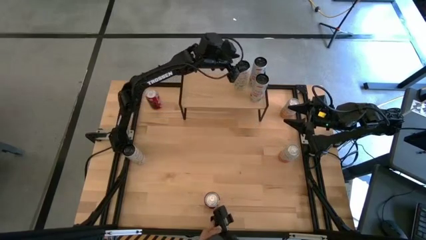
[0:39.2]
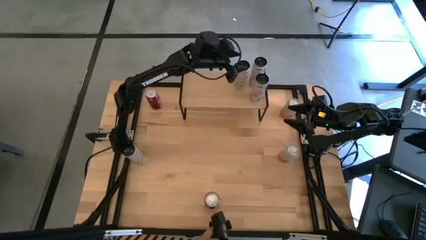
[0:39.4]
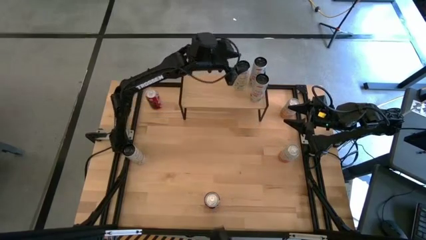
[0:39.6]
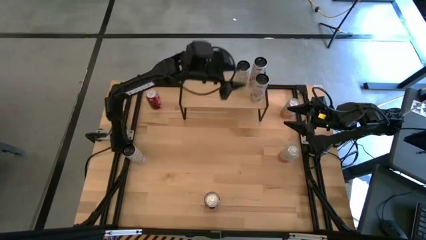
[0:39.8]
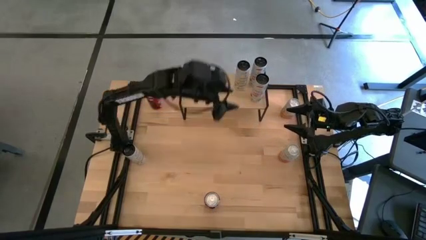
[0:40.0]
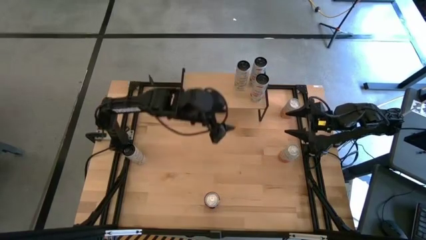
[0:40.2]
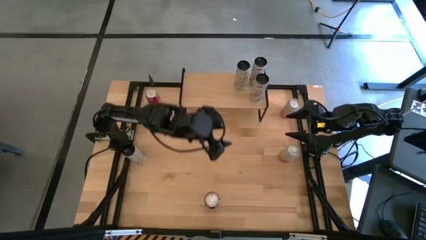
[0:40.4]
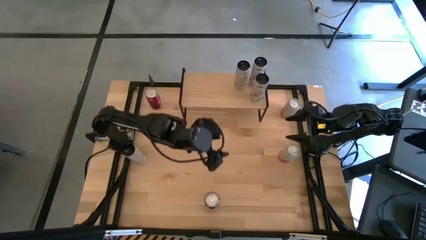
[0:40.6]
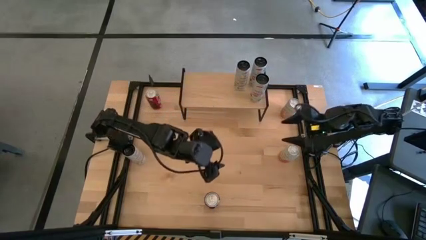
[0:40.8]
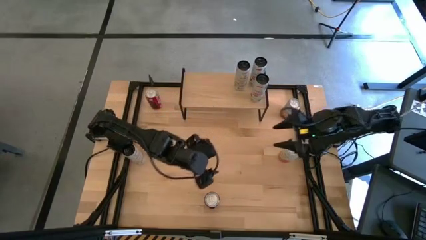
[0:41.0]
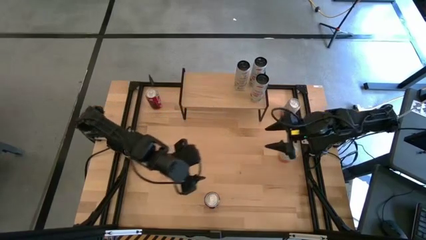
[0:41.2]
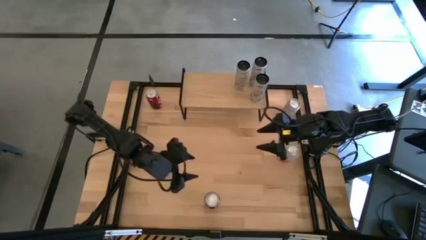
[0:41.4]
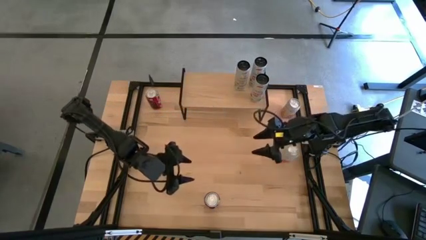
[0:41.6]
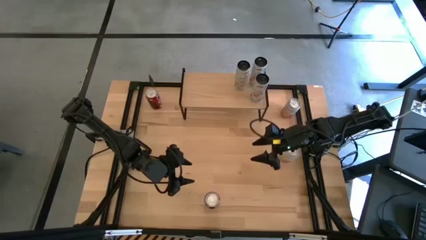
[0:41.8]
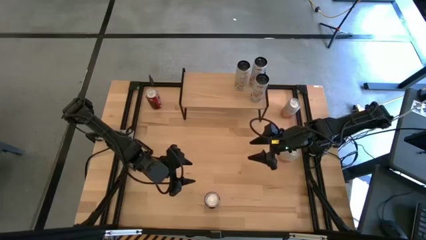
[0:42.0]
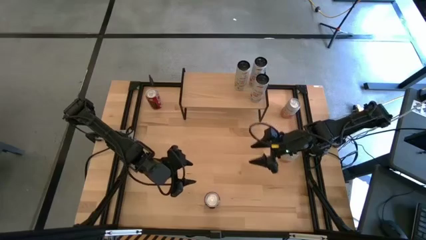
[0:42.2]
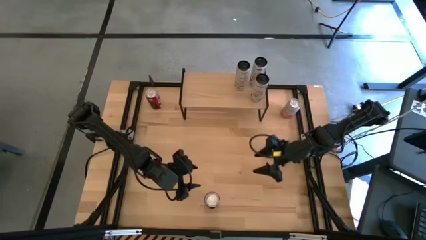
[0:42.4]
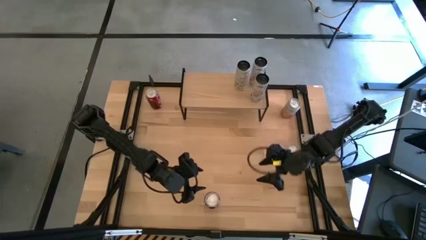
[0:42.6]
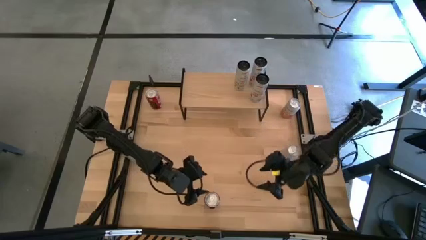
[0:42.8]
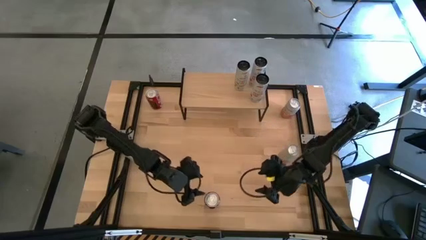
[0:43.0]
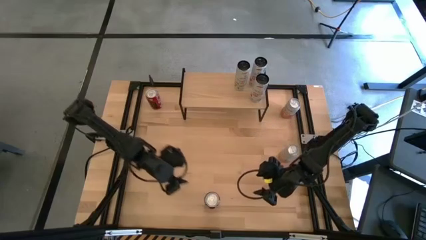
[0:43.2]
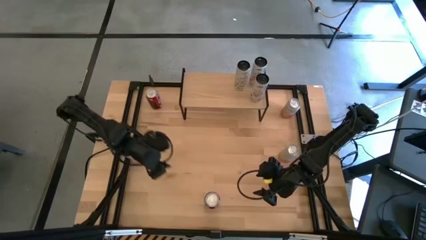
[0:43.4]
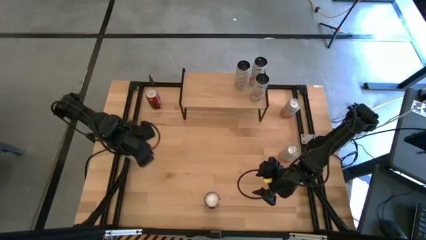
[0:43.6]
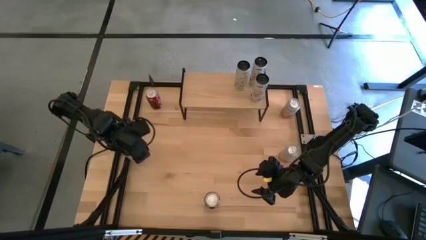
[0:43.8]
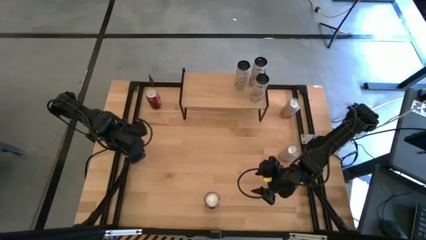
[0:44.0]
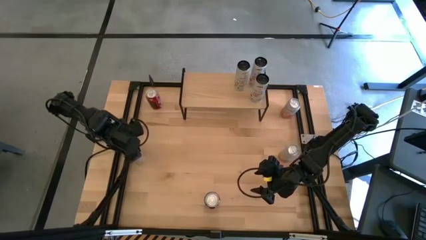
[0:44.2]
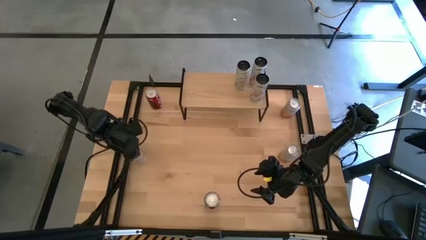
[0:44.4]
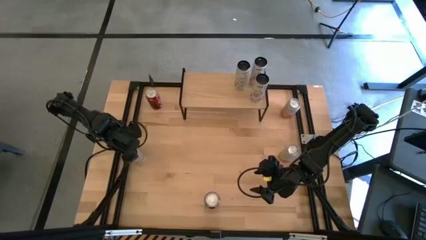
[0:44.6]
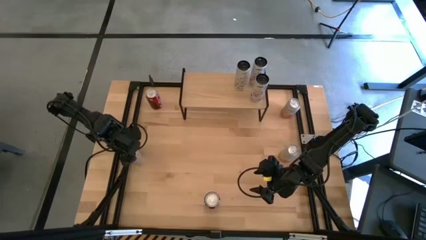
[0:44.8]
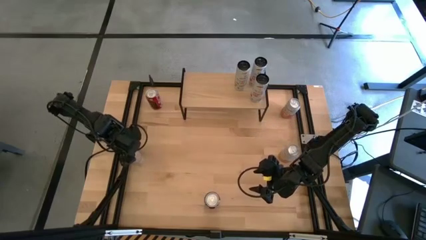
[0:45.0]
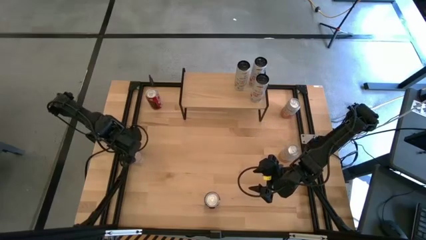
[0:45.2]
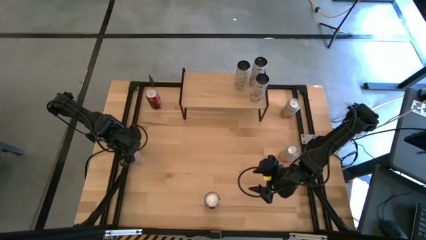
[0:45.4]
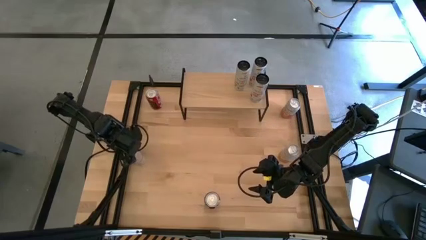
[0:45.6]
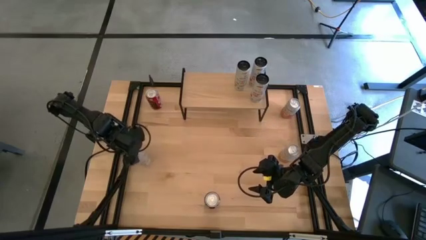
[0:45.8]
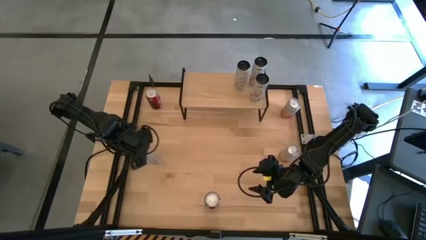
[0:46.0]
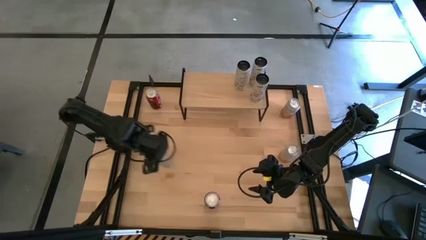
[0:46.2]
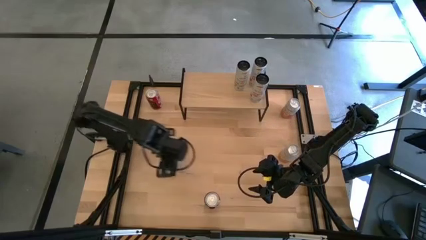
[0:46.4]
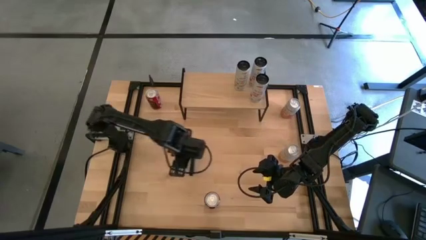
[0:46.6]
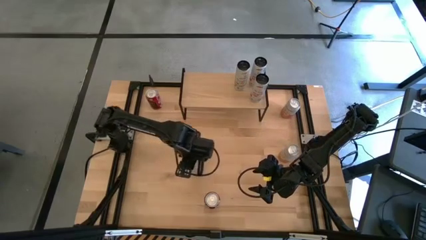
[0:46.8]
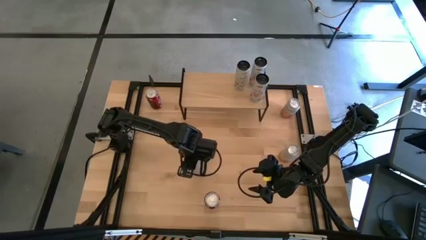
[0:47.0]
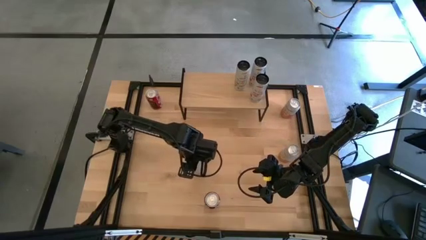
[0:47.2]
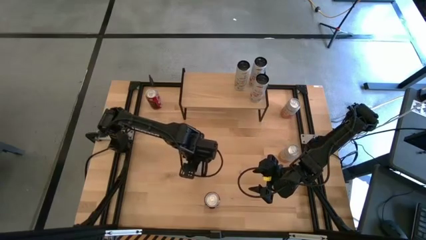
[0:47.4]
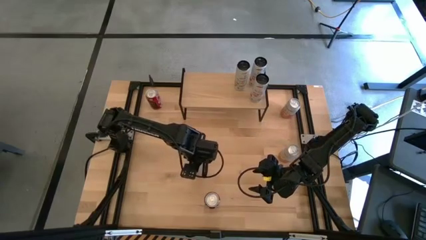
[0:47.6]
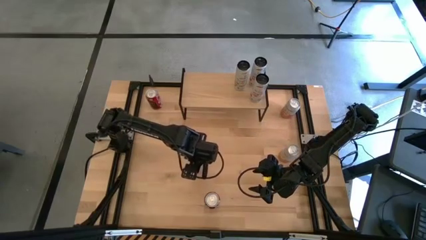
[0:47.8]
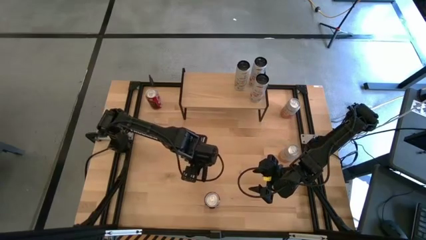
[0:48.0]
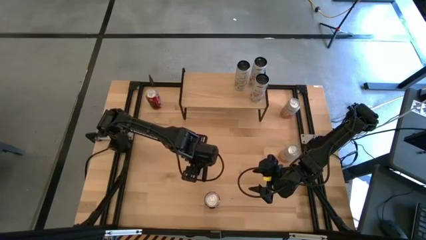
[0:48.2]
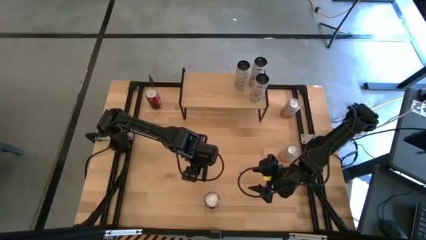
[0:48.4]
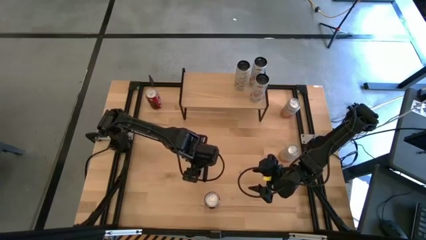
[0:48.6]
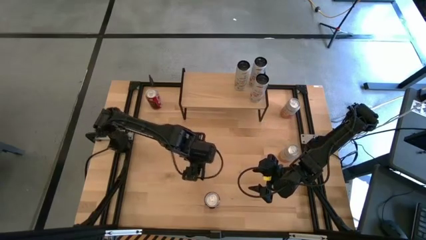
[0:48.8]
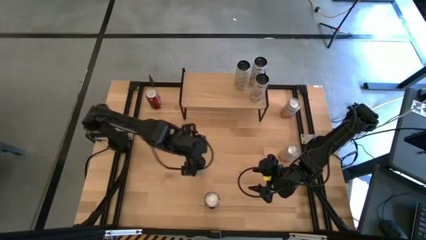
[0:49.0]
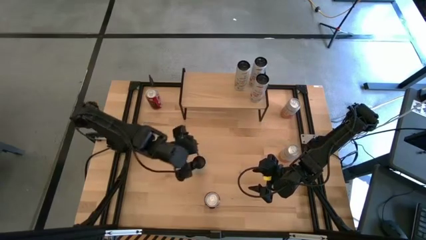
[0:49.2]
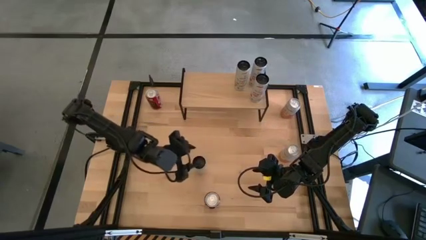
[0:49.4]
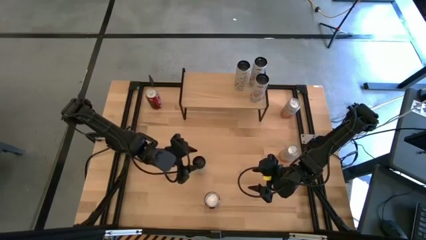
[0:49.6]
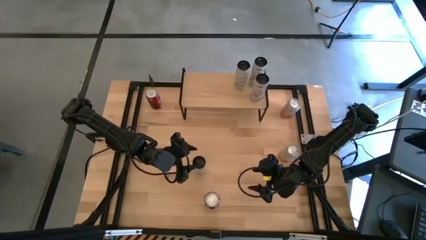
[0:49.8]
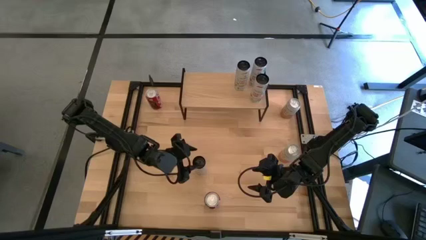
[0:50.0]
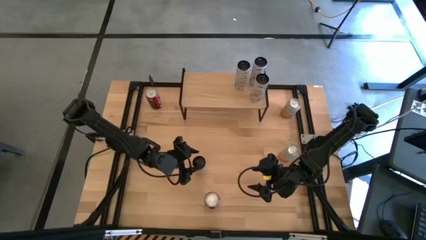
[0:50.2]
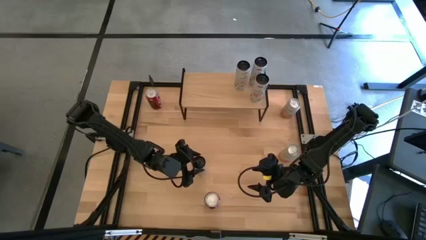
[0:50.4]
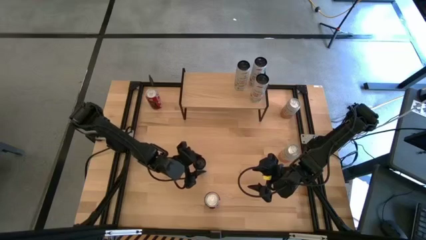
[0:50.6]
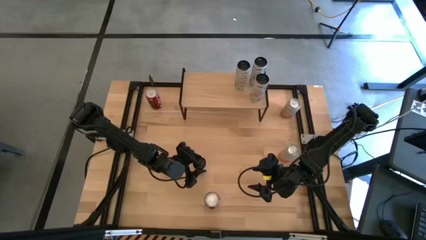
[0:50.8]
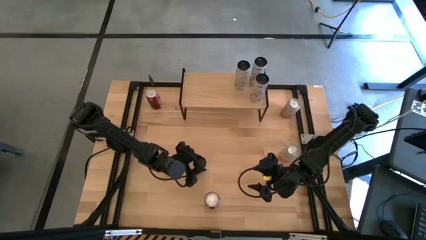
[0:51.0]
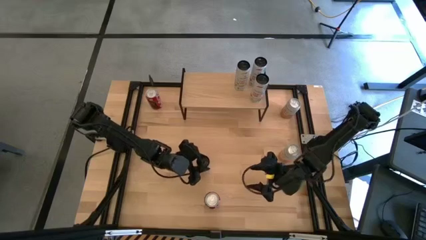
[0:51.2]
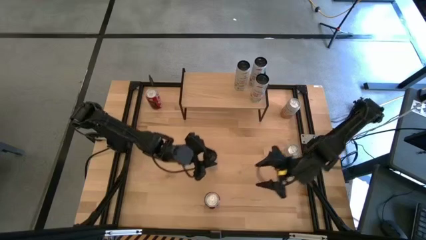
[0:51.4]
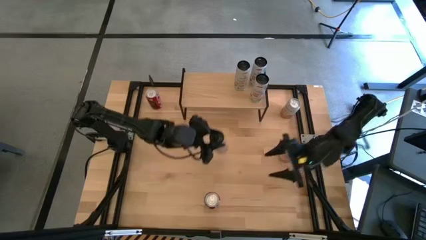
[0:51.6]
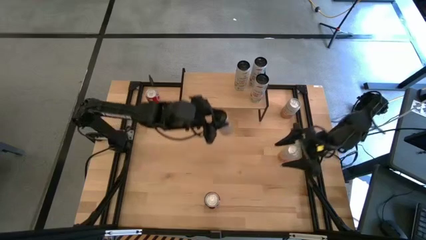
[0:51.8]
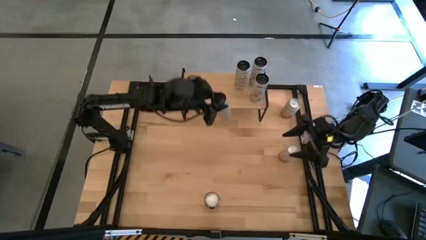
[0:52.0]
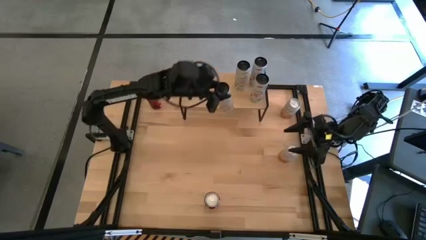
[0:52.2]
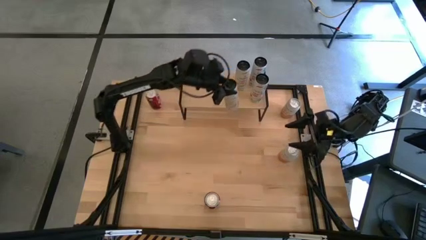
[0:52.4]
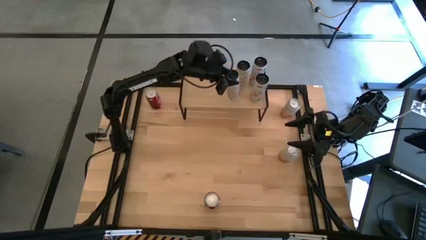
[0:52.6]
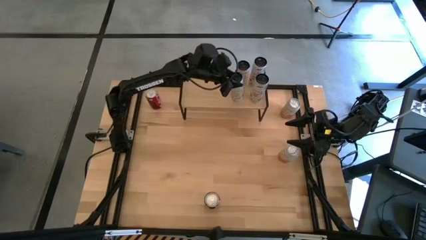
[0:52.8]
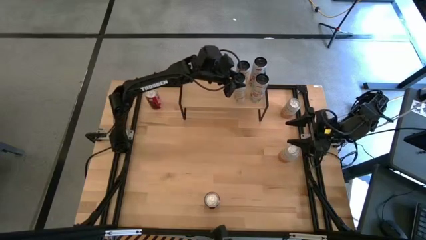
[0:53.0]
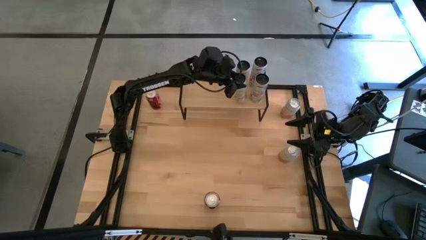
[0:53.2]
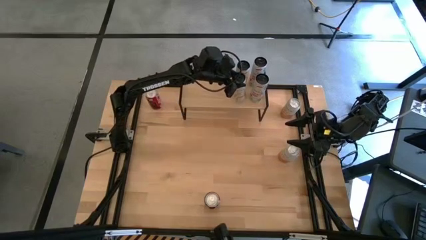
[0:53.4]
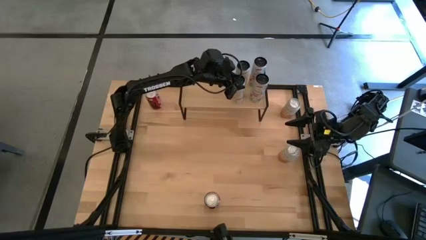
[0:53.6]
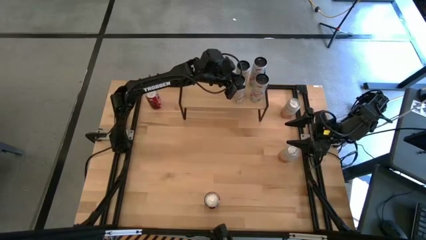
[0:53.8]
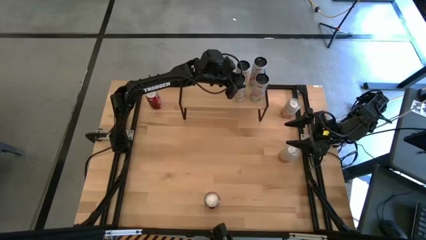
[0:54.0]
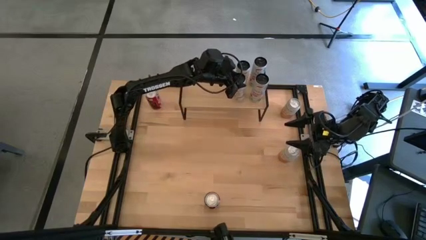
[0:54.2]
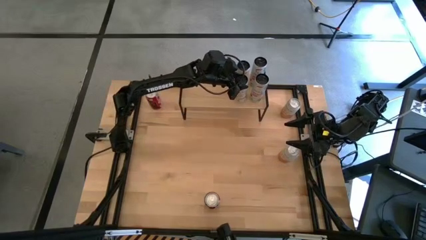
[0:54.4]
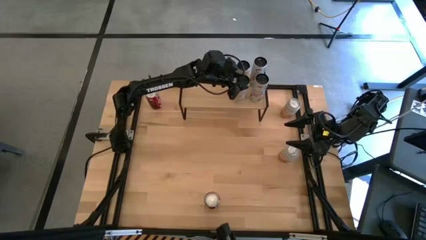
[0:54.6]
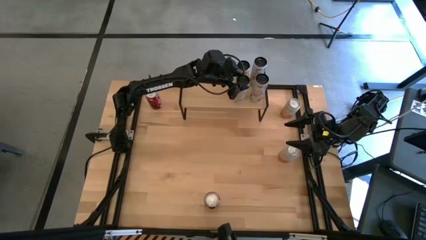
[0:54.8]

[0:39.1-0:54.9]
Task: Place canned beverage on shelf
Put the white-yellow soda can on the shelf aligned with the other white-yellow soda can

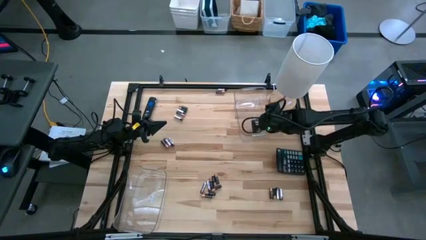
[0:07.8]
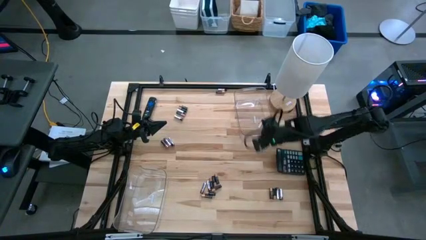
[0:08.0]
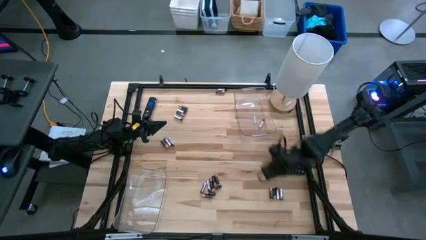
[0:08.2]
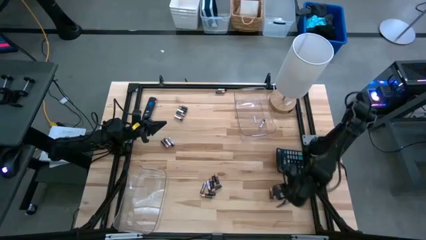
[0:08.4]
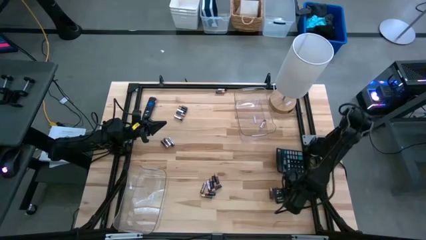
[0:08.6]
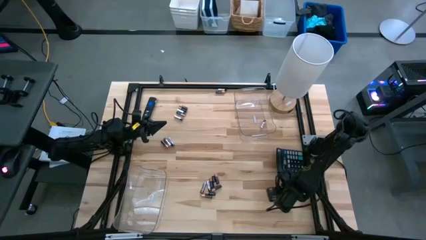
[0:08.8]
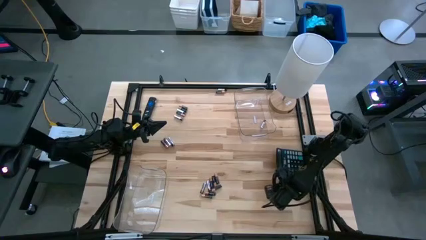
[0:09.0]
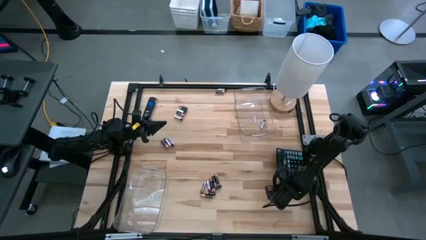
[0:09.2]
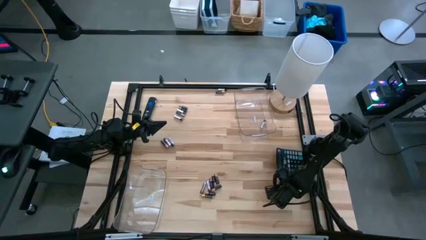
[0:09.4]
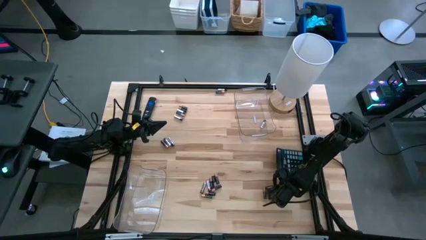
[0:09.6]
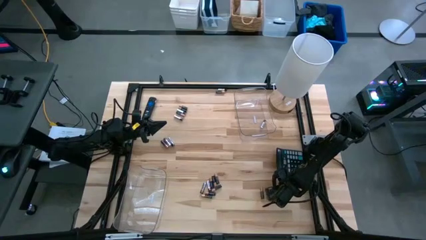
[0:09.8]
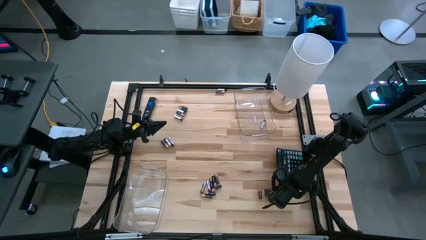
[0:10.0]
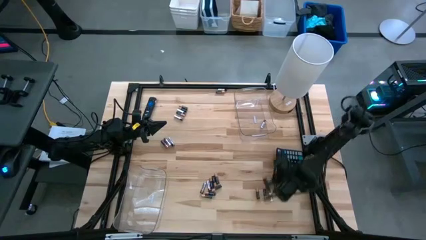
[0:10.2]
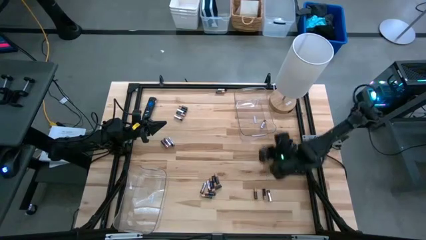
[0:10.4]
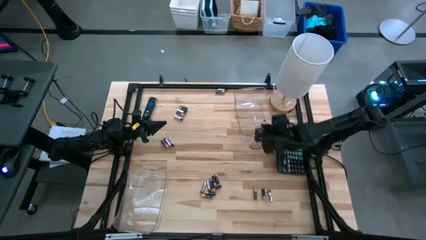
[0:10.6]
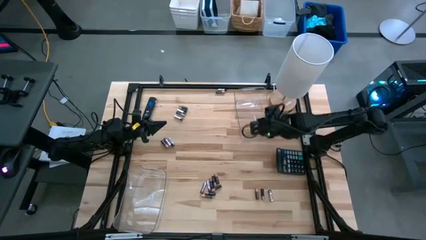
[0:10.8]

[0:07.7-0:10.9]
Task: Sort batteries
Put the silver battery into the right transparent bin
